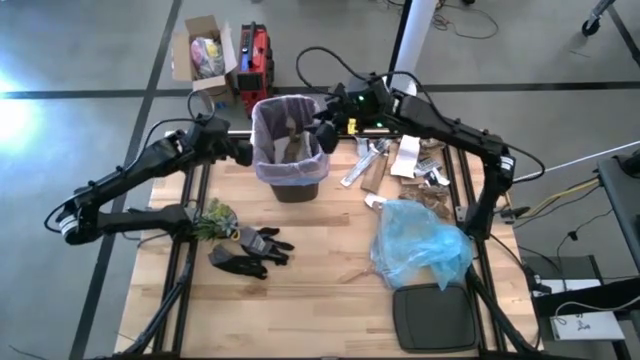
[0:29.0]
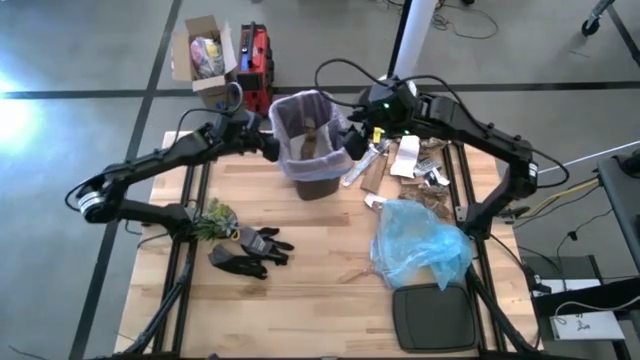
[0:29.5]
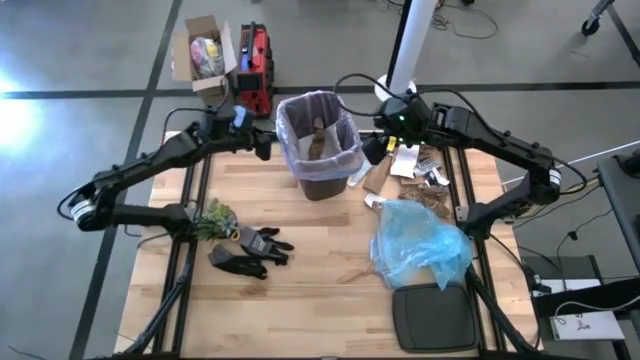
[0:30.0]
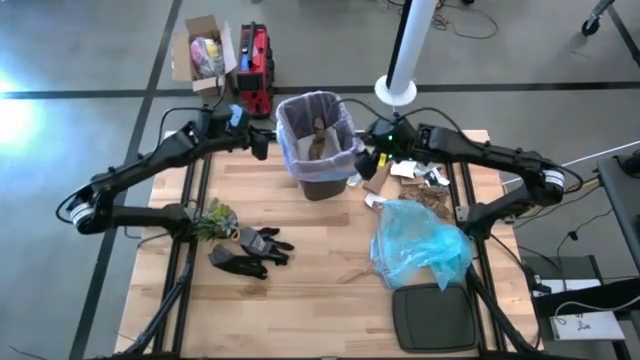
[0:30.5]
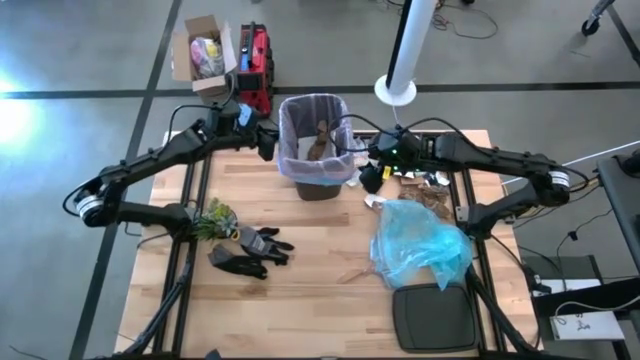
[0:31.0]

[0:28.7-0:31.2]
Task: place trash/remove bag and relplace
Adjust the trash bin

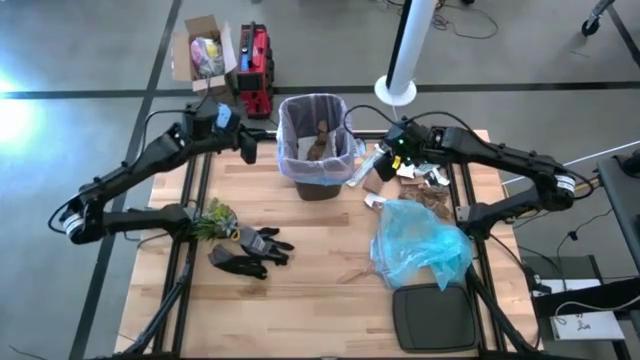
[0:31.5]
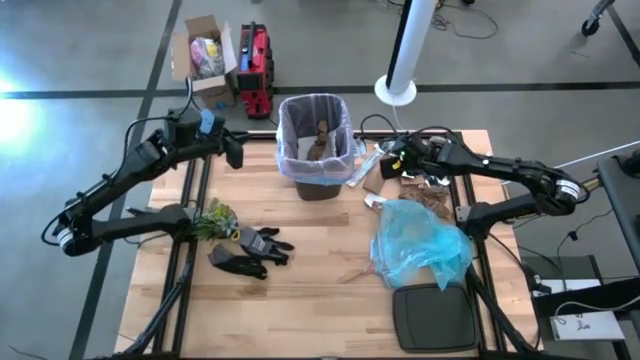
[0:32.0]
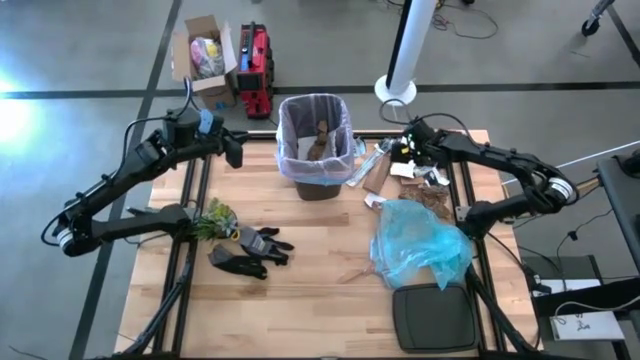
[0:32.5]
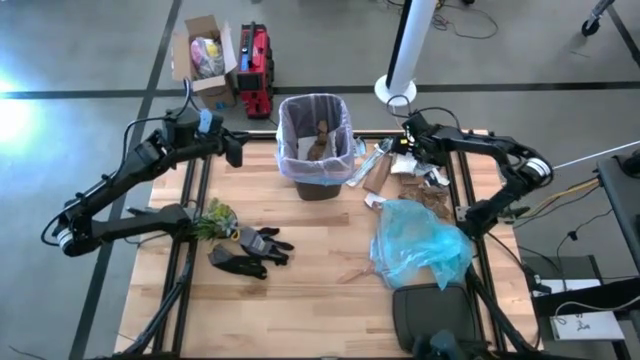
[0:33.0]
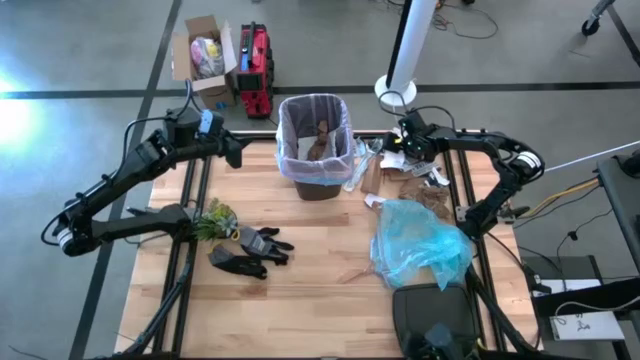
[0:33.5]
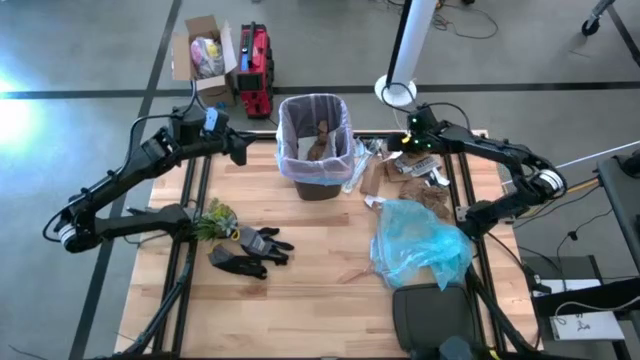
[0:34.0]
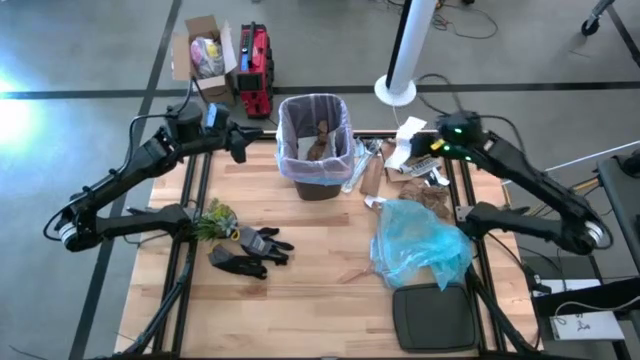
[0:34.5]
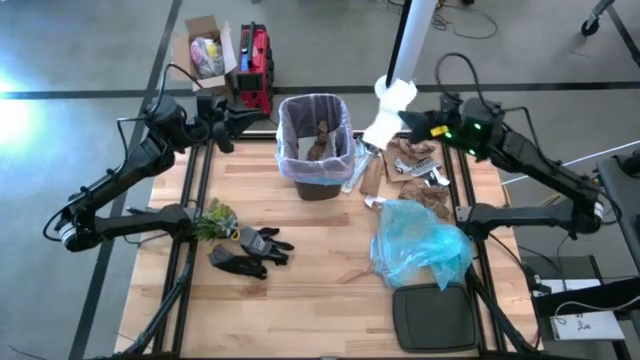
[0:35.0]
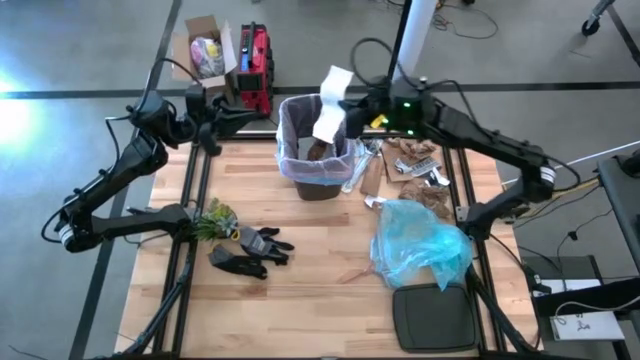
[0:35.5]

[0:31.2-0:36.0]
Put the white paper into the trash bin

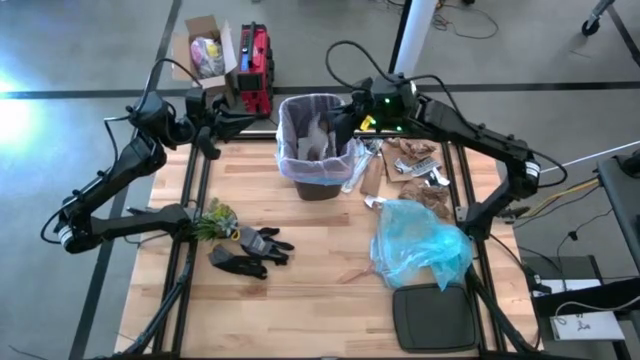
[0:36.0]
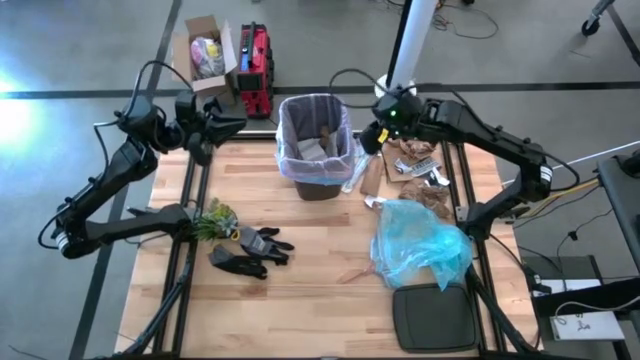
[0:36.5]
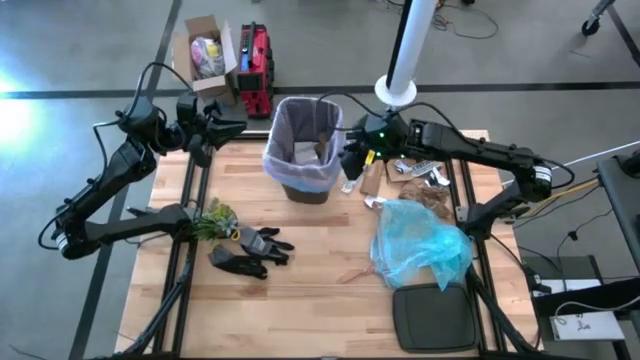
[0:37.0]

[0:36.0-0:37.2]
Adjust the trash bin

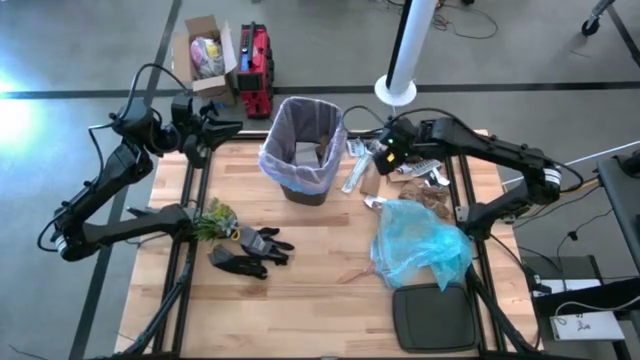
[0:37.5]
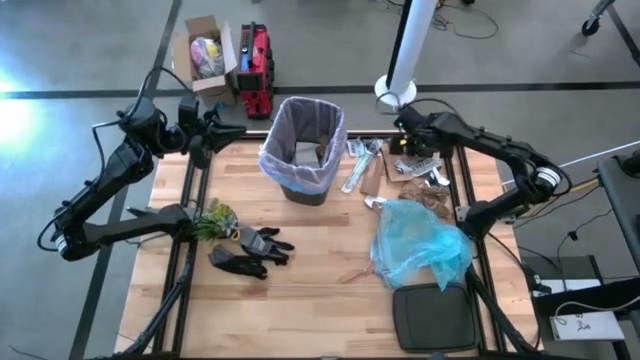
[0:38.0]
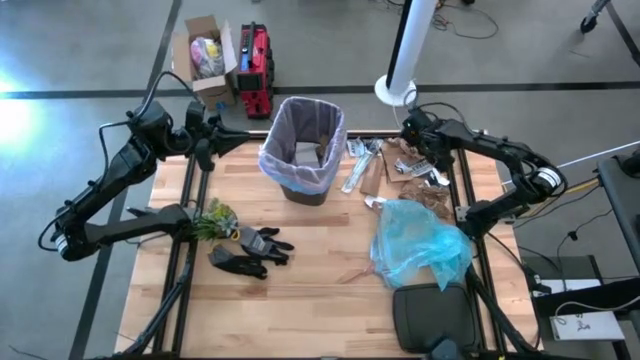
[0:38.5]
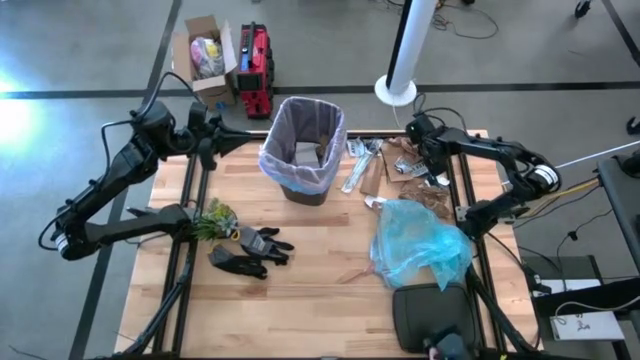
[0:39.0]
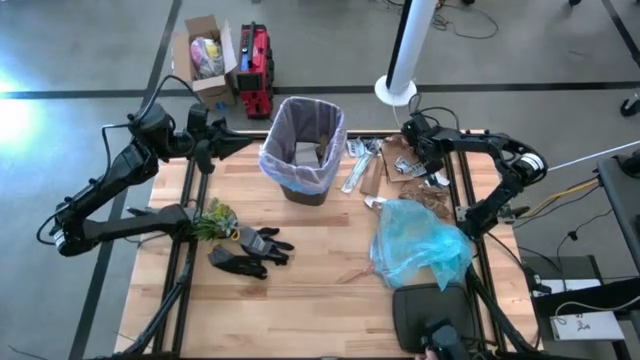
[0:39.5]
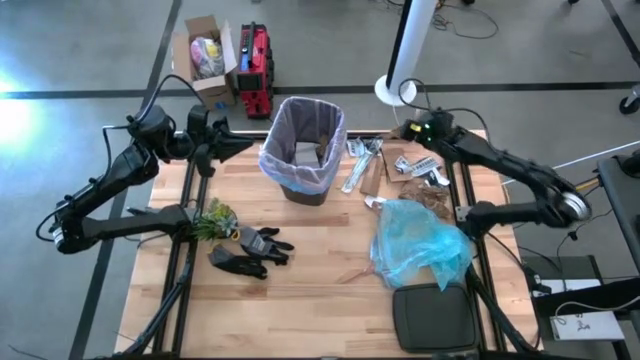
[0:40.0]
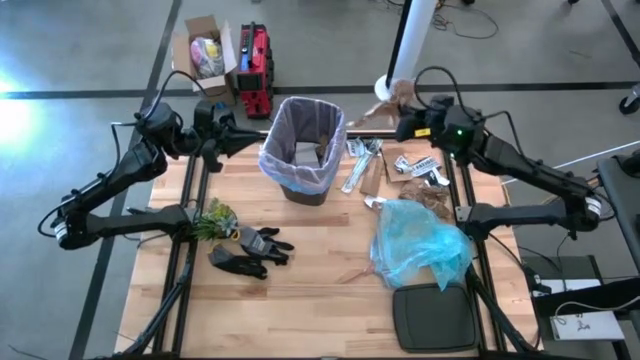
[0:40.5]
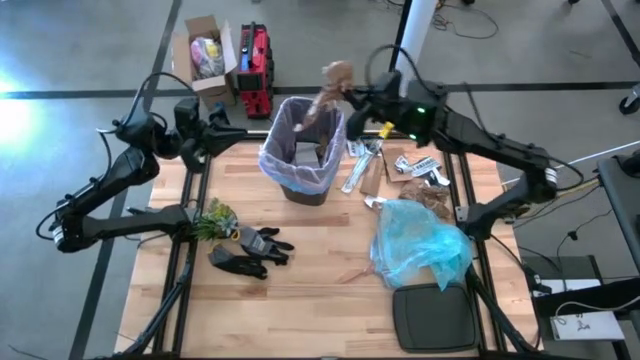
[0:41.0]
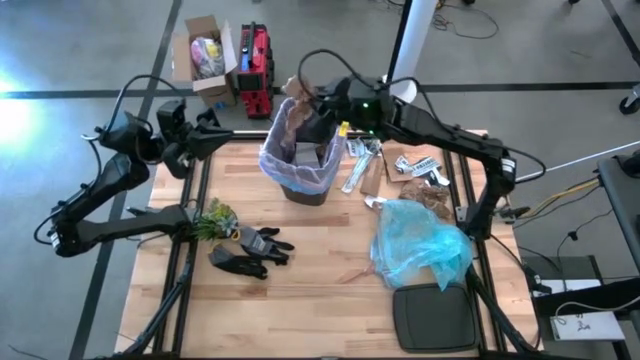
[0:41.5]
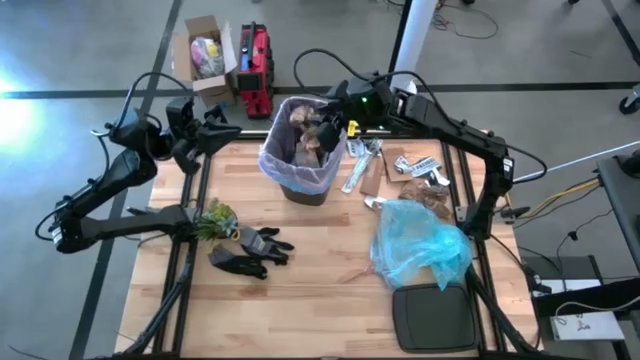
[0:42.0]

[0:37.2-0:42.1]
Put the brown napkin into the trash bin

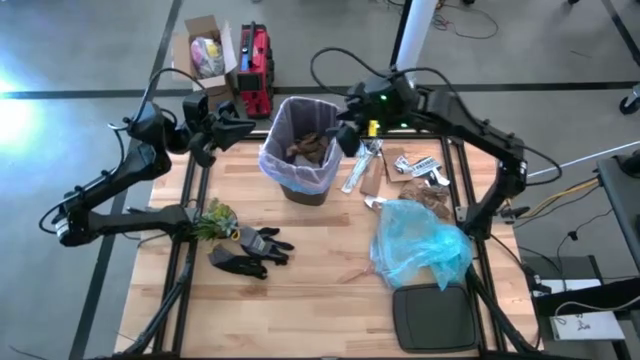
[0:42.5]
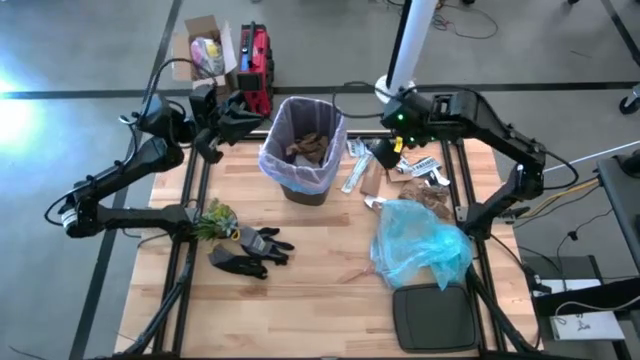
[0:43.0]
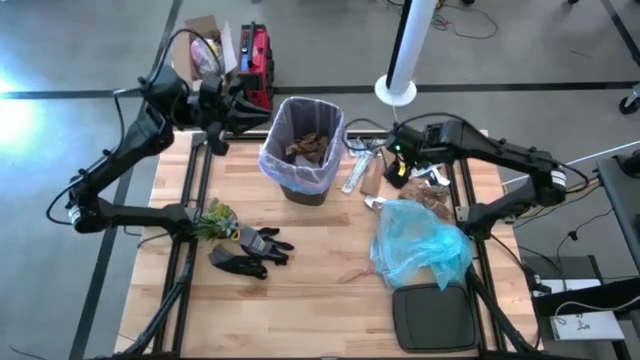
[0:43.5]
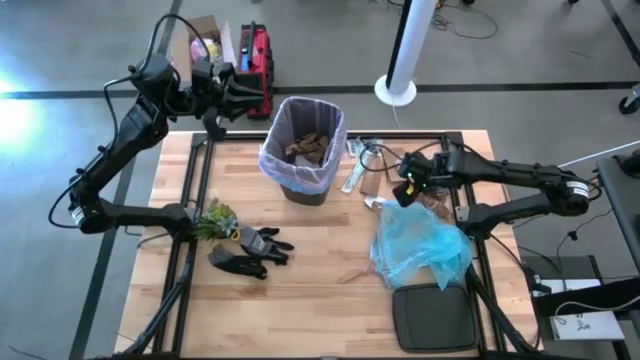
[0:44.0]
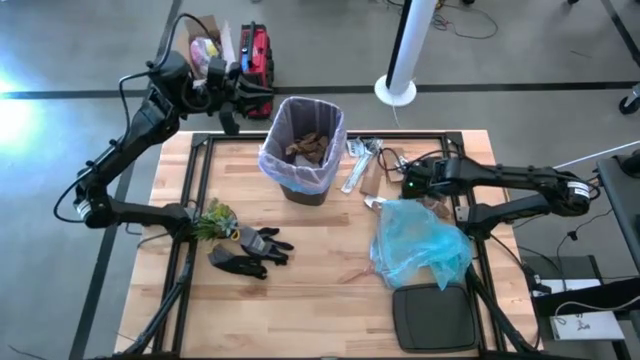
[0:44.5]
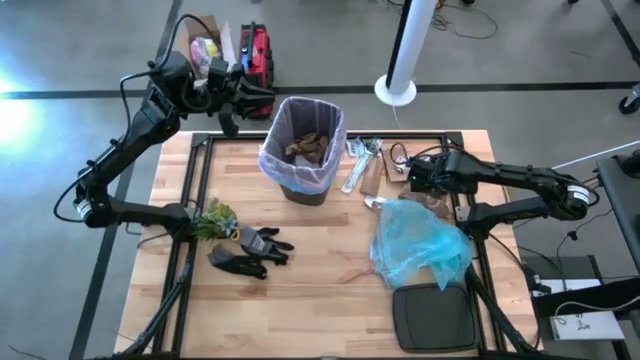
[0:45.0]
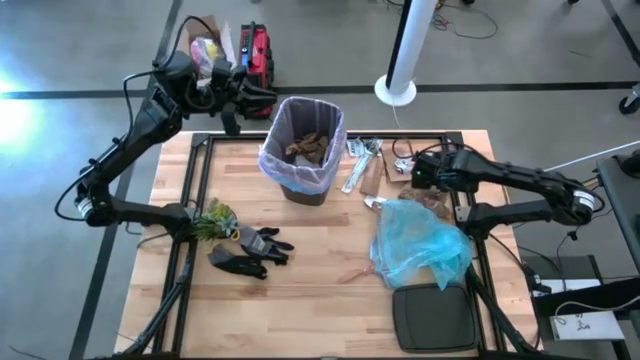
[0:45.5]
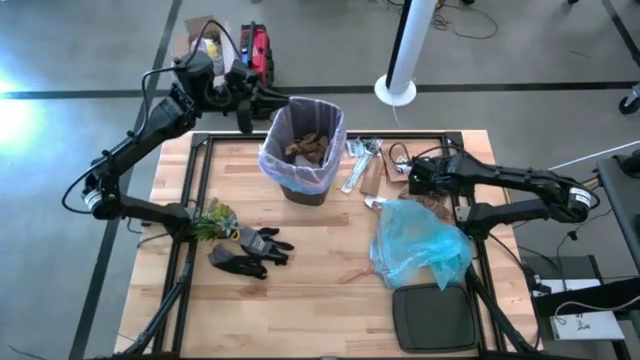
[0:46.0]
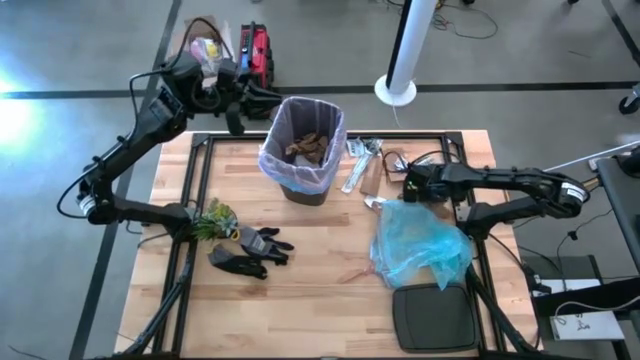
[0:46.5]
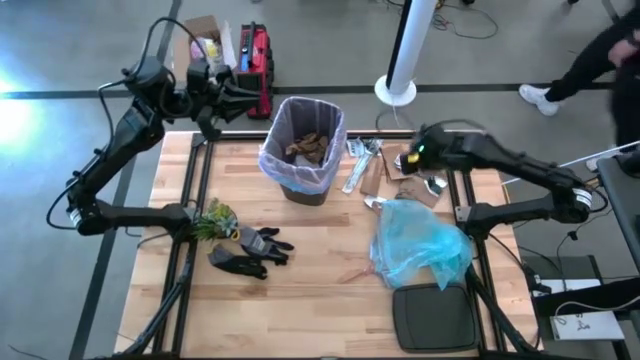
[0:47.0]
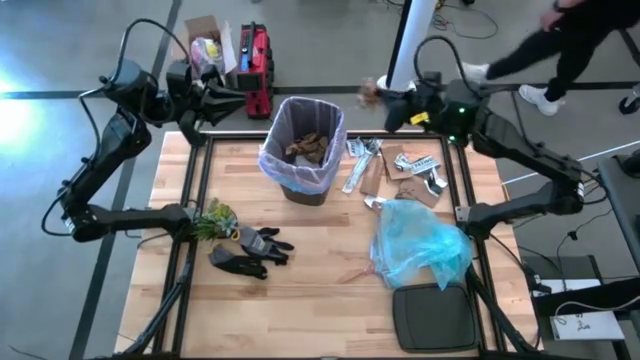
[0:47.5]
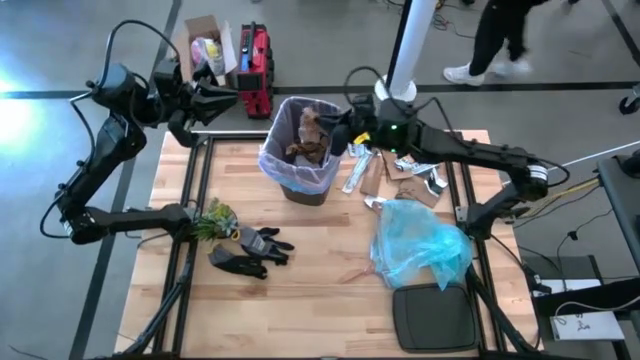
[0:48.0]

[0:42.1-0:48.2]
Put the brown napkin into the trash bin

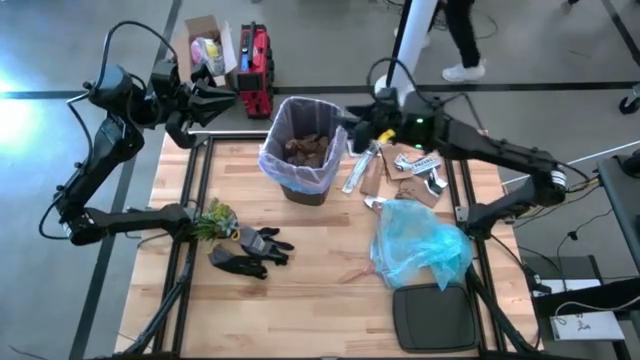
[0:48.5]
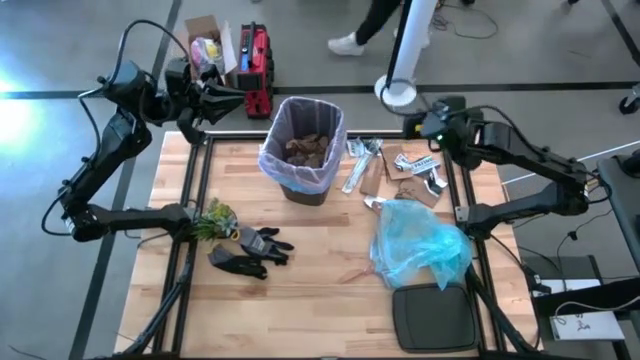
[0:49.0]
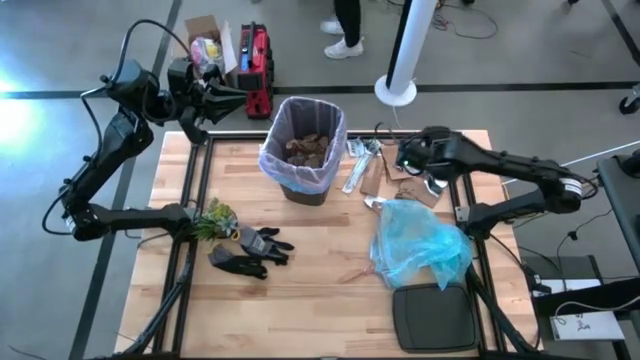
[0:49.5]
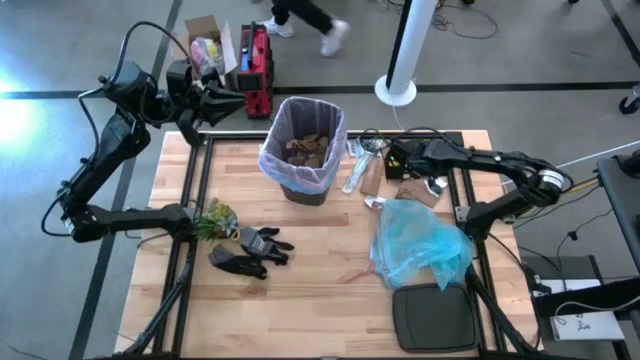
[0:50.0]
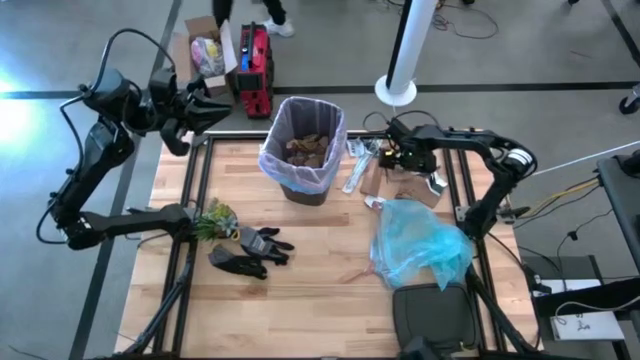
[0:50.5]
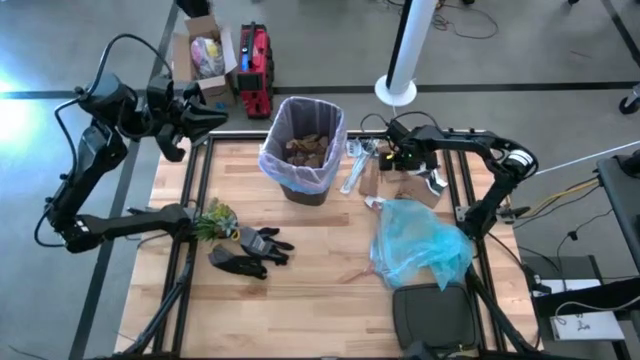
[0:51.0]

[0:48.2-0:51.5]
Put the white paper into the trash bin
